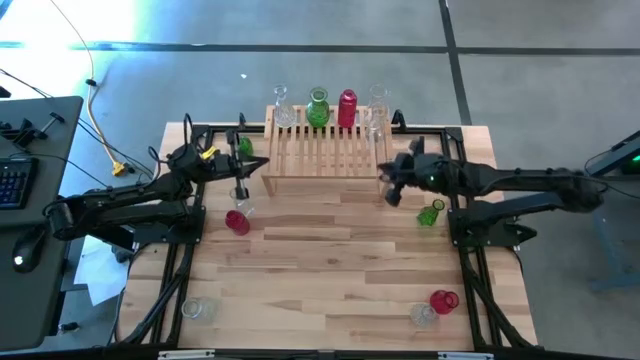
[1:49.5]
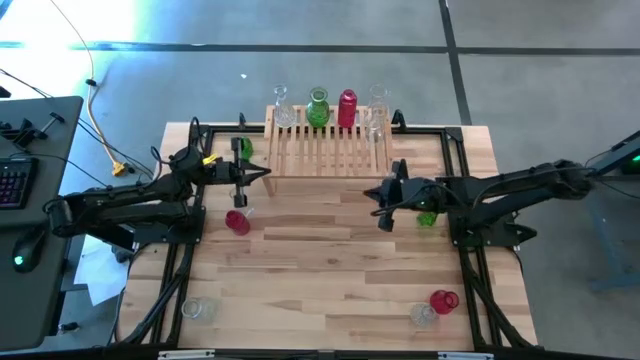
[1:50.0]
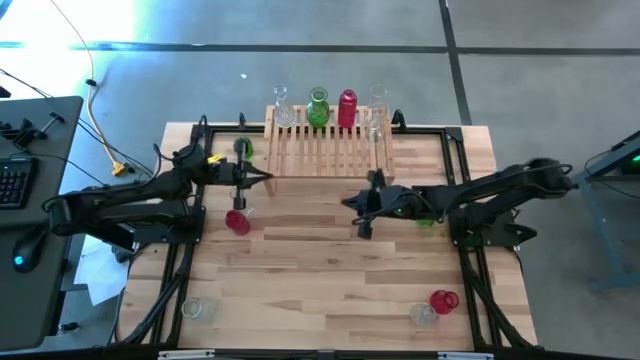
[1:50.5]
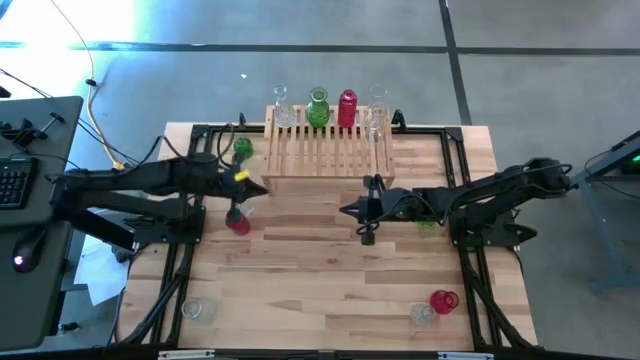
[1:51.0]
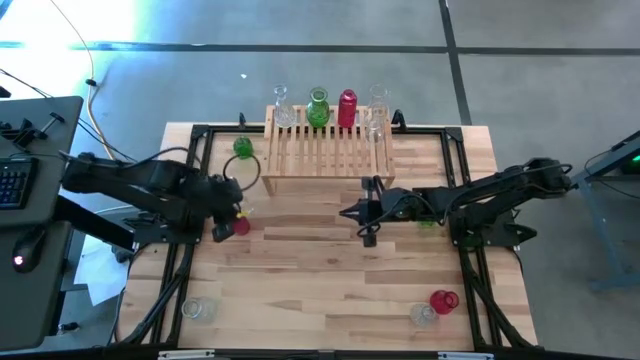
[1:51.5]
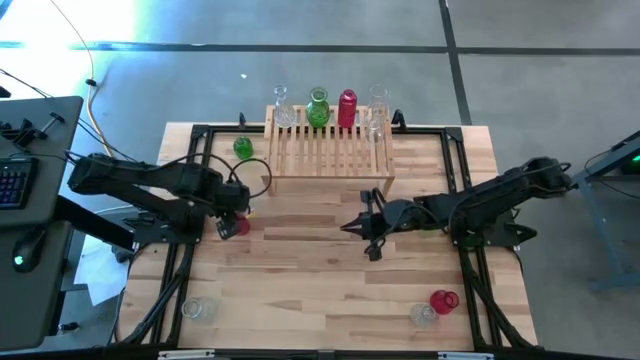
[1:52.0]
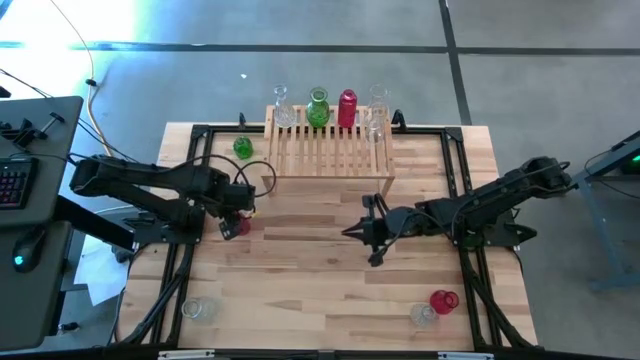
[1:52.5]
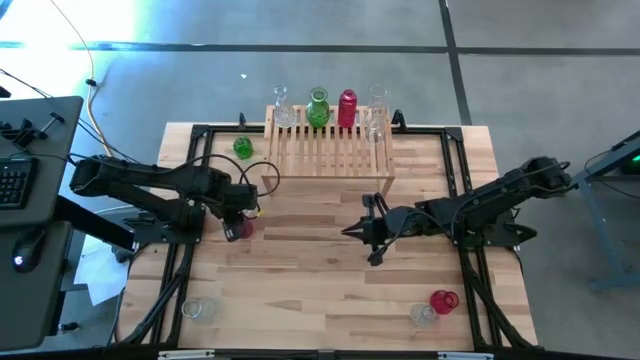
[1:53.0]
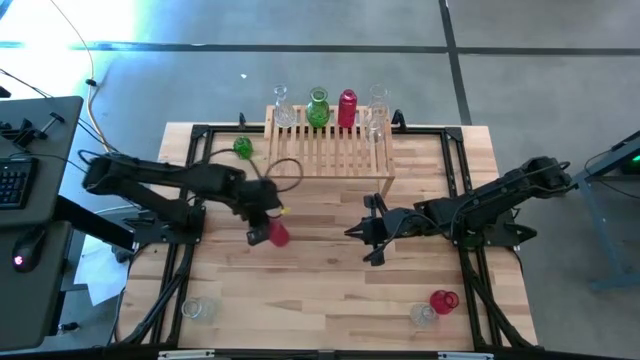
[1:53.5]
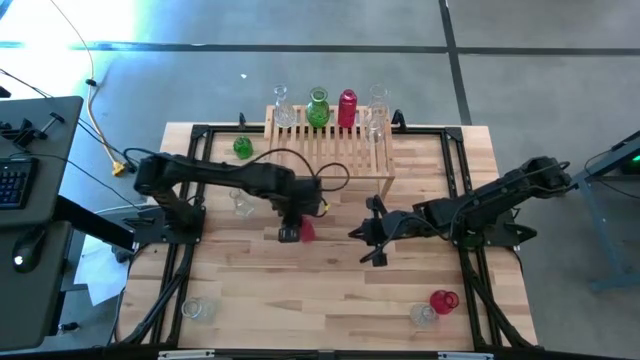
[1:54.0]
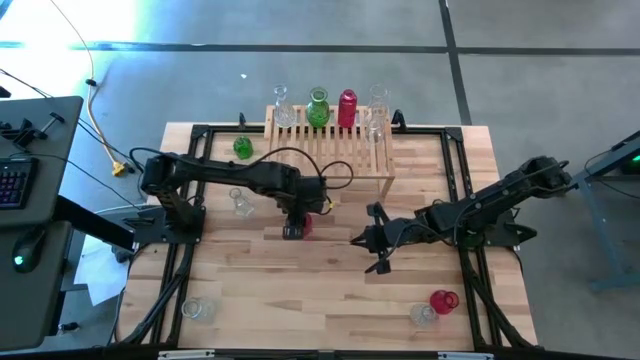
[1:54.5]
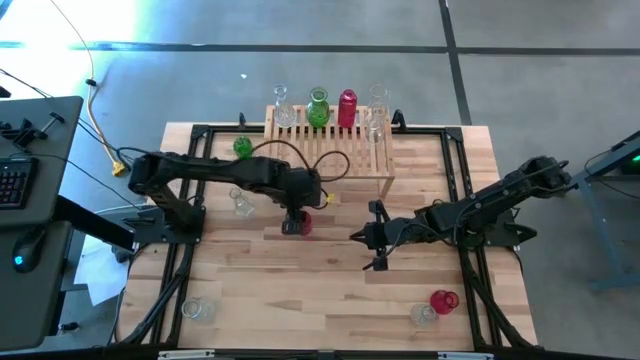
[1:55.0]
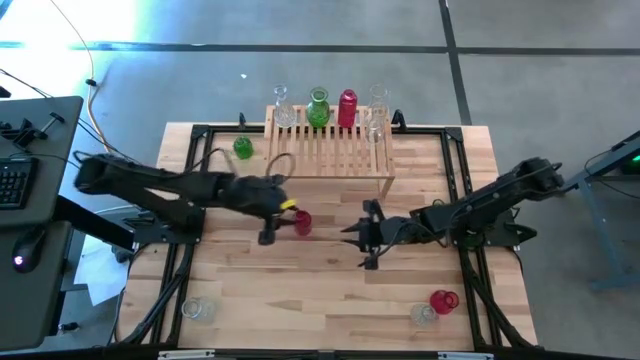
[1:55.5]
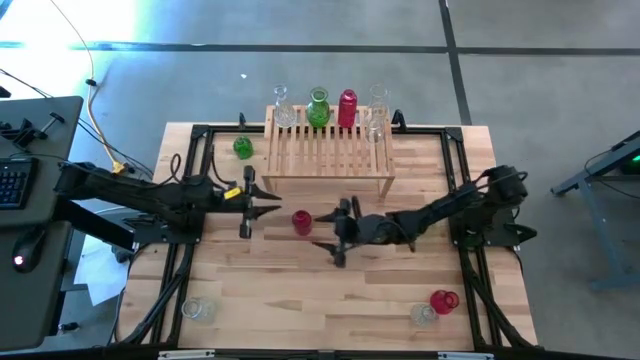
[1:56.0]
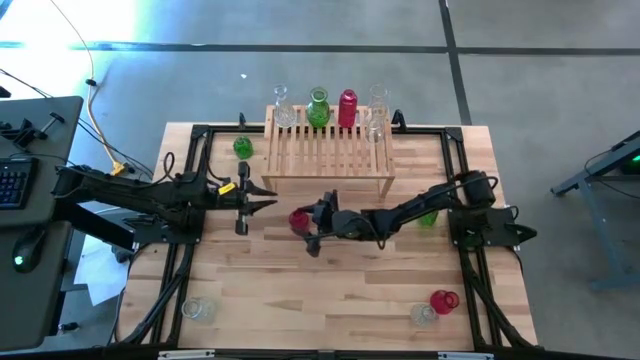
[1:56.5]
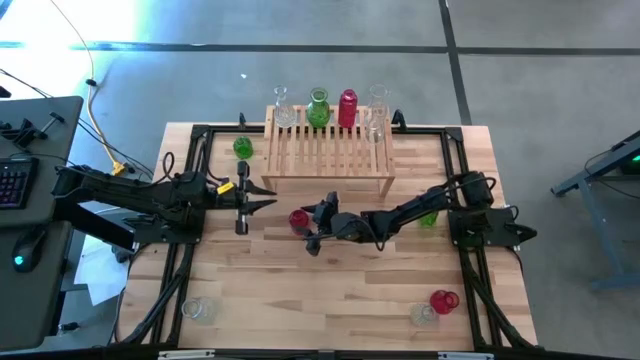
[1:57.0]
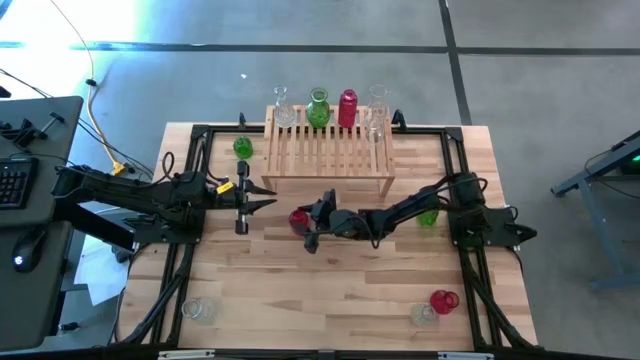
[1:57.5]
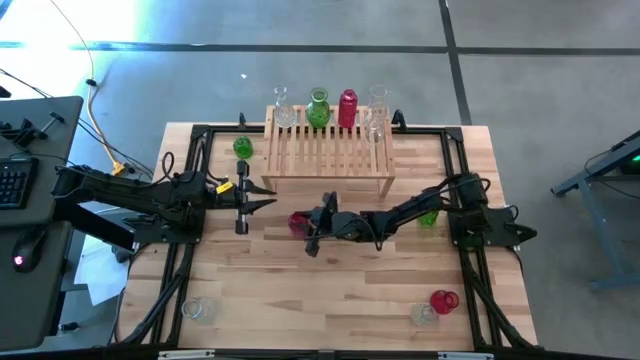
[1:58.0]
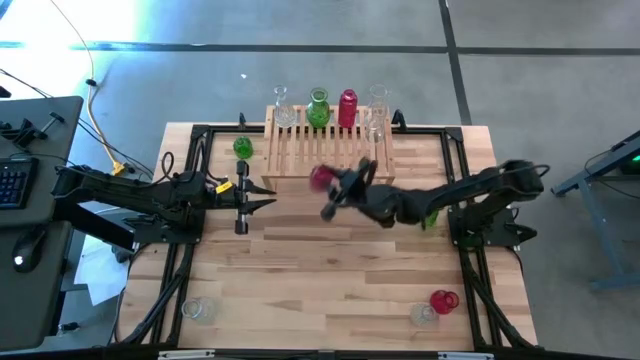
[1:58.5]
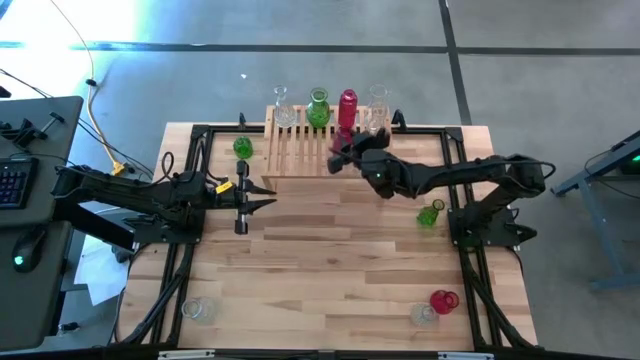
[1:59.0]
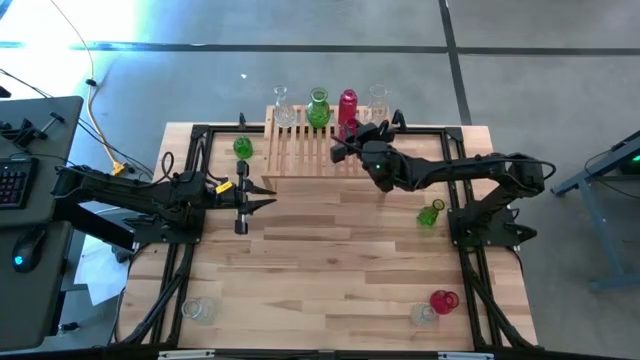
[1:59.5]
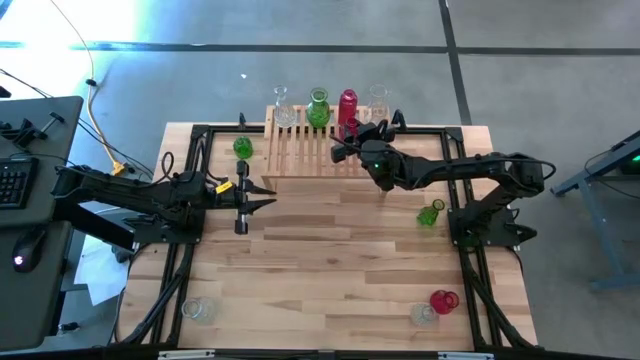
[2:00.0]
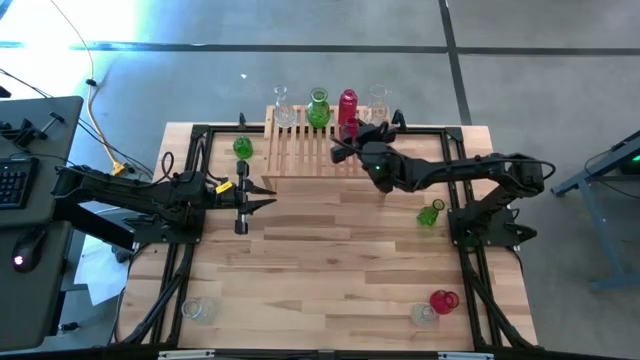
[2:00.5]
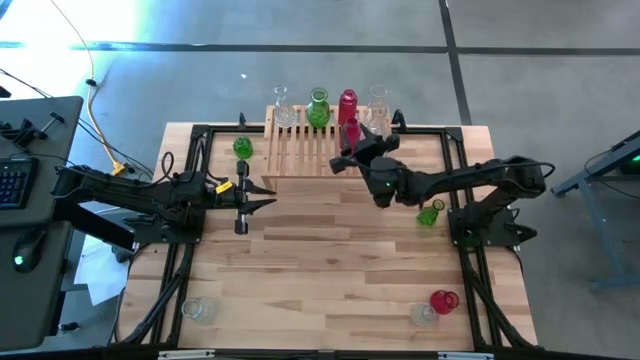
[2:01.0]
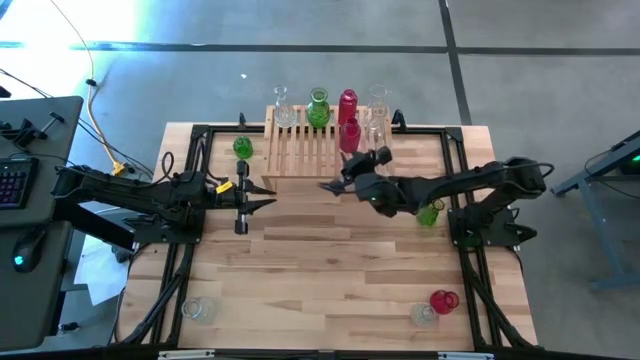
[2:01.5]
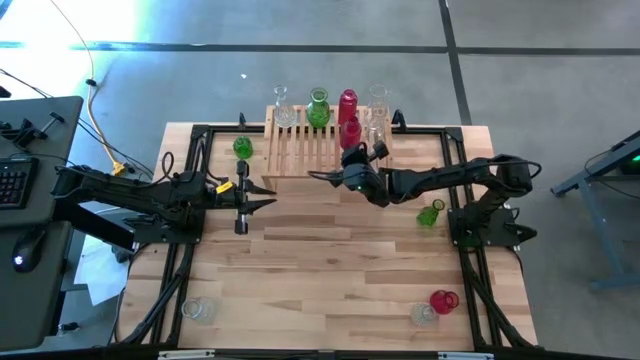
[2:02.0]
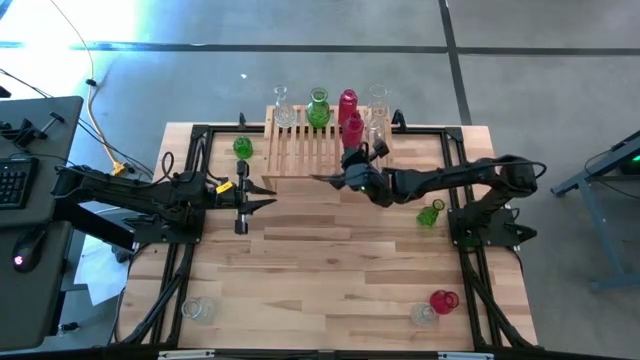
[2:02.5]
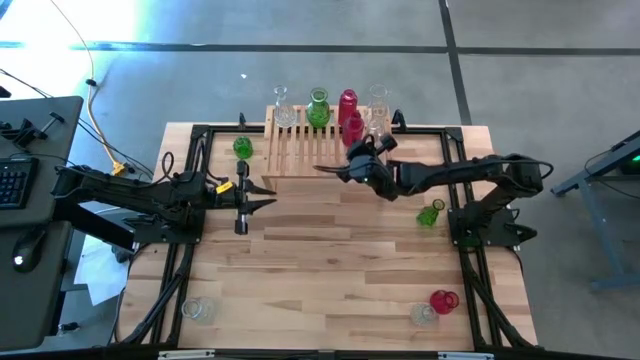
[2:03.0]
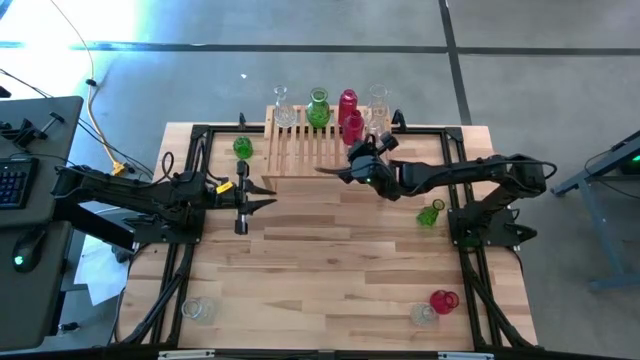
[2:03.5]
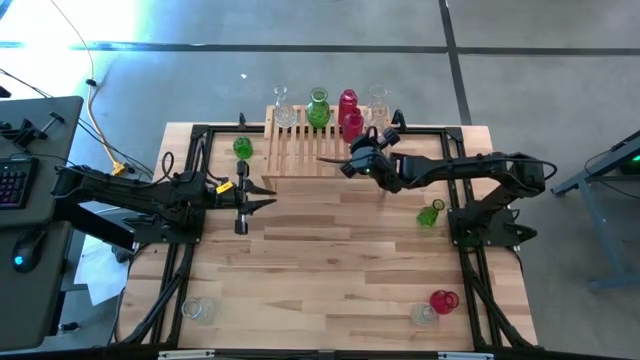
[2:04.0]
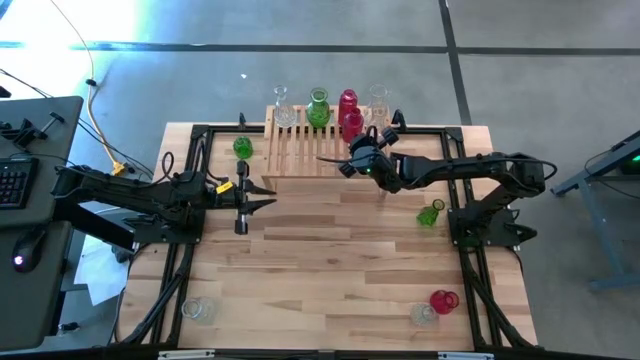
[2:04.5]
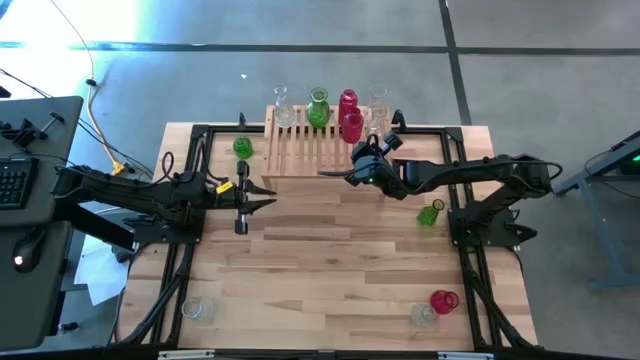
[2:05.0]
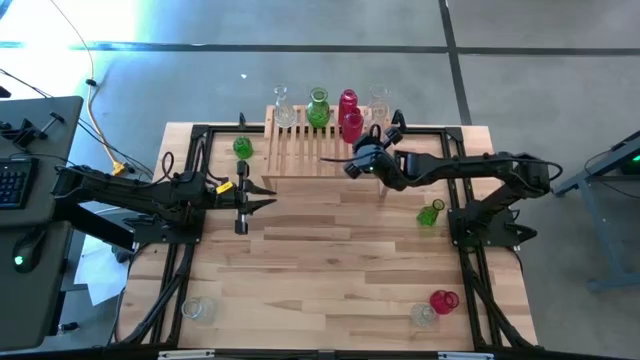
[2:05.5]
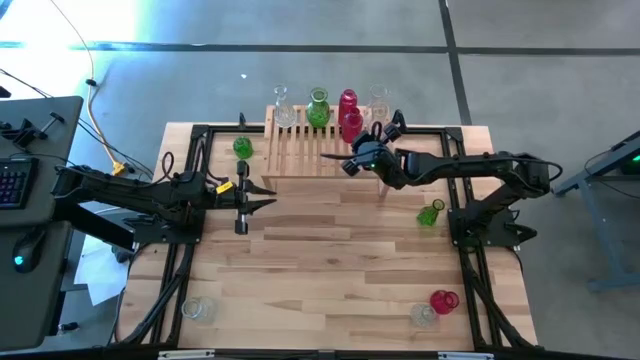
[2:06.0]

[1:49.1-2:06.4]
Task: sort vases onto shelf
Put the red vase on the shelf aligned with the other red vase

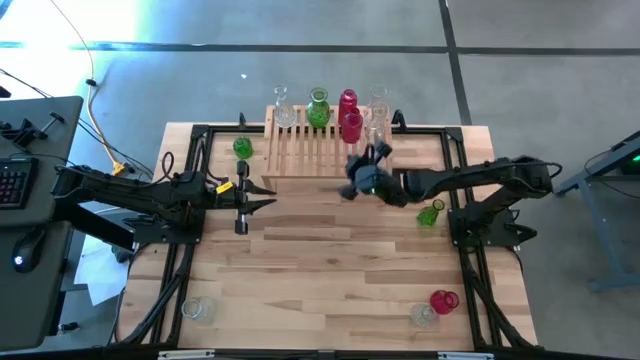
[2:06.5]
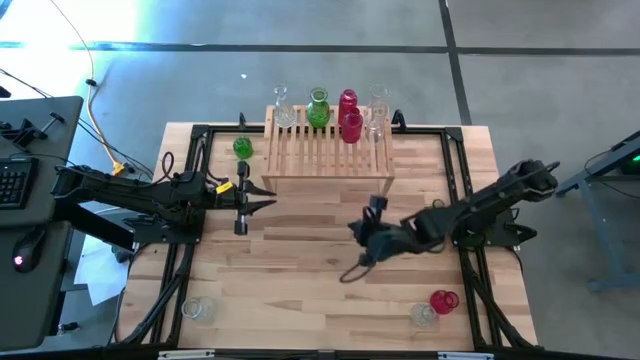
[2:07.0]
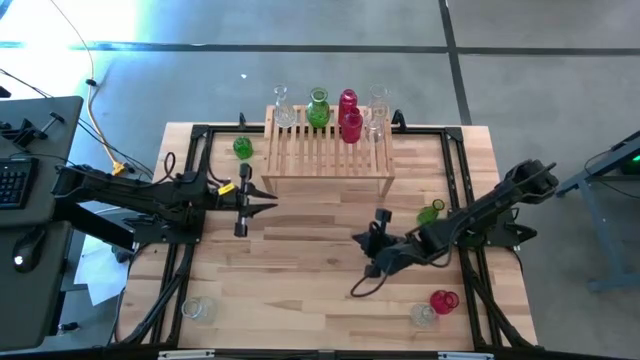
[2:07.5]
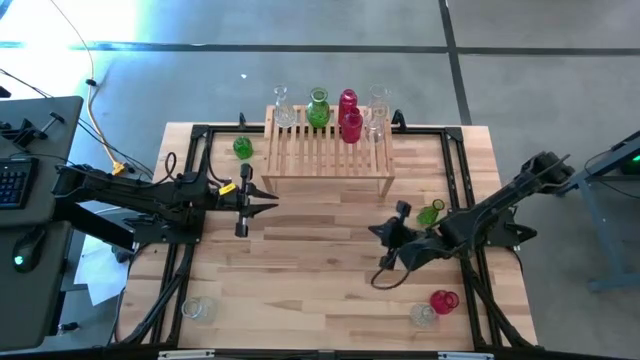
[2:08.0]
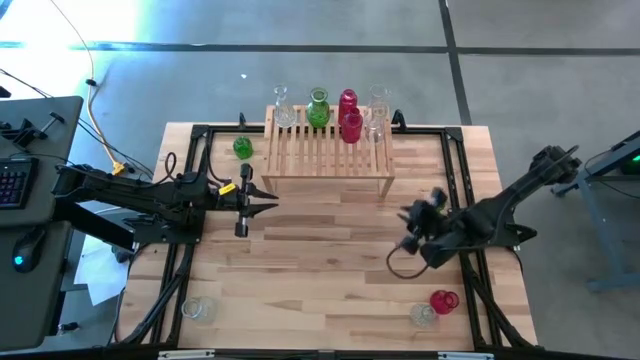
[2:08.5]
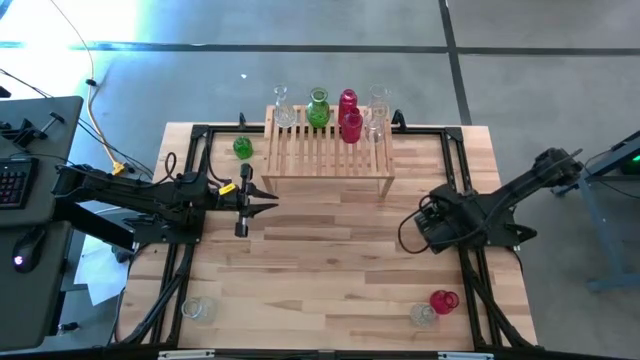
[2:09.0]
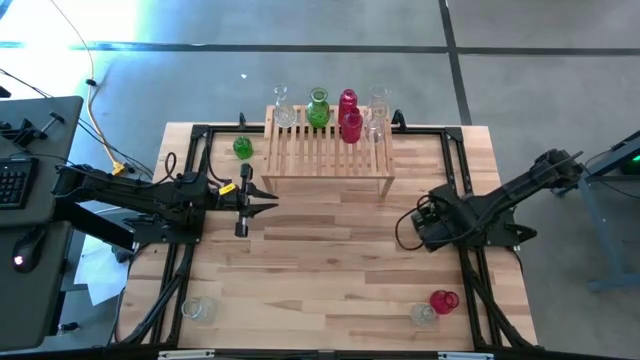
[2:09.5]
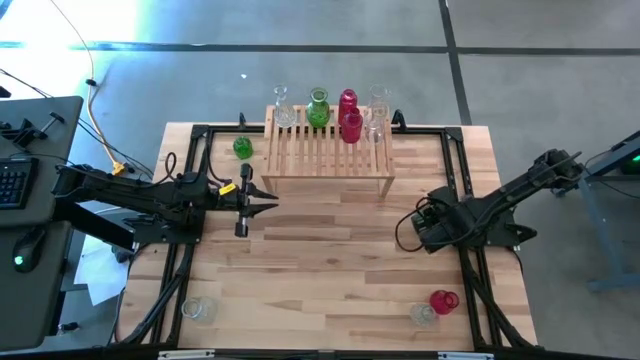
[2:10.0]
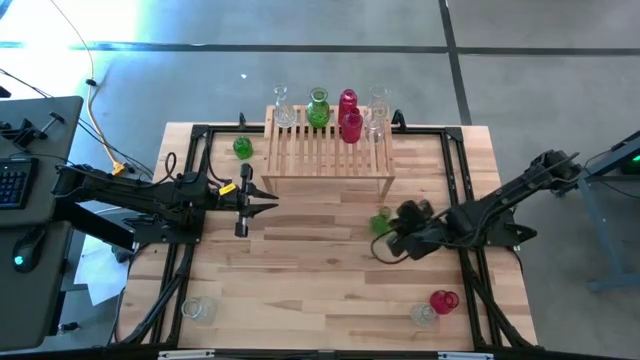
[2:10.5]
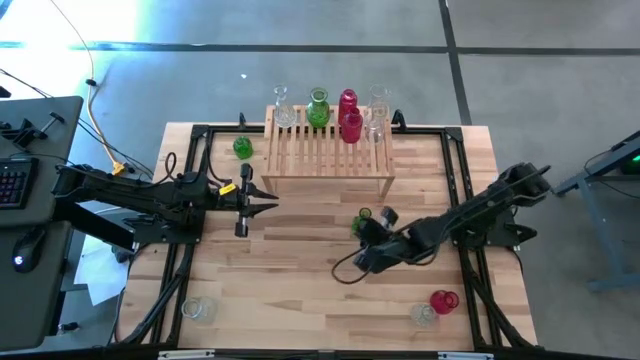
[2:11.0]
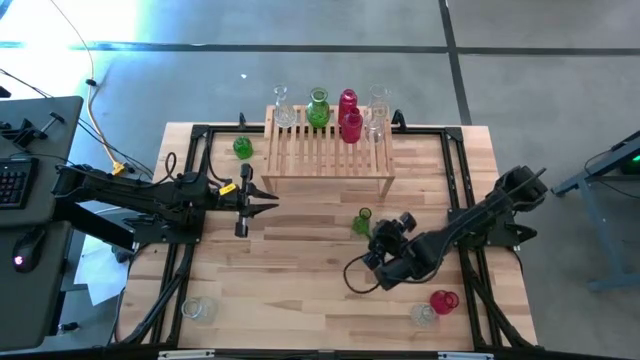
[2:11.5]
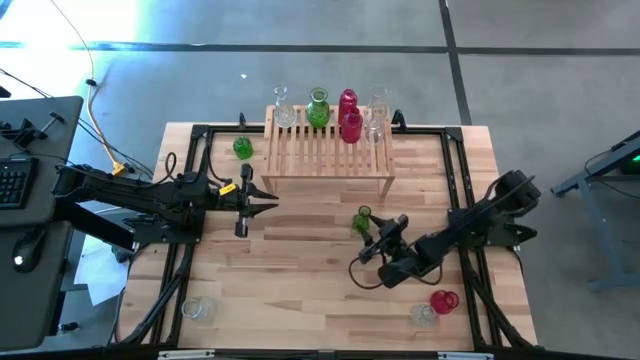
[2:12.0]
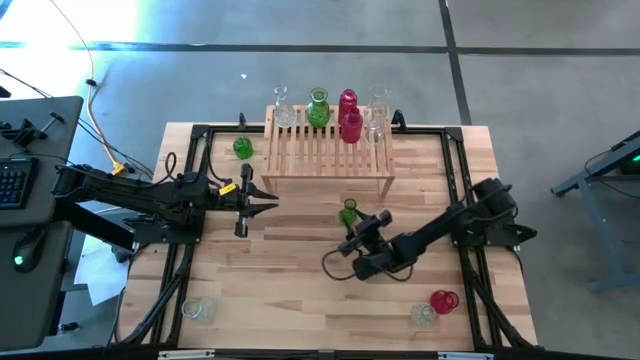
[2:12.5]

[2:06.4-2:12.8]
Put the green vase on the shelf aligned with the other green vase
